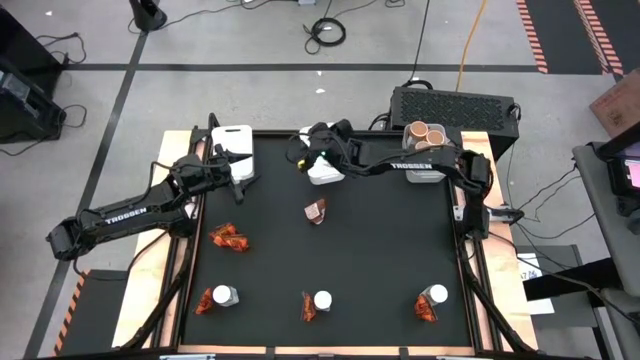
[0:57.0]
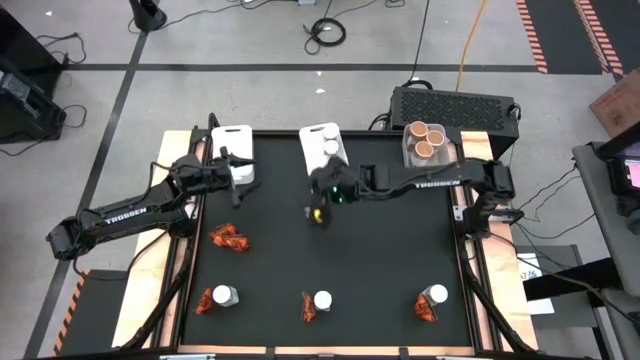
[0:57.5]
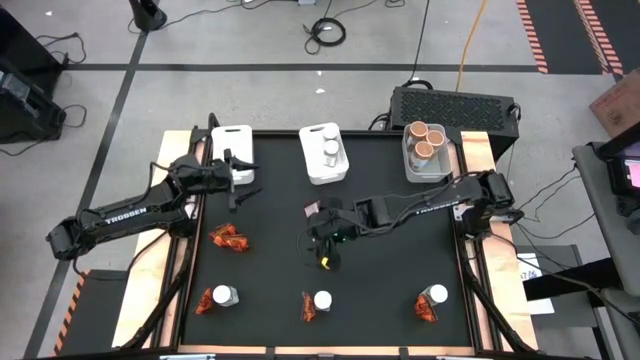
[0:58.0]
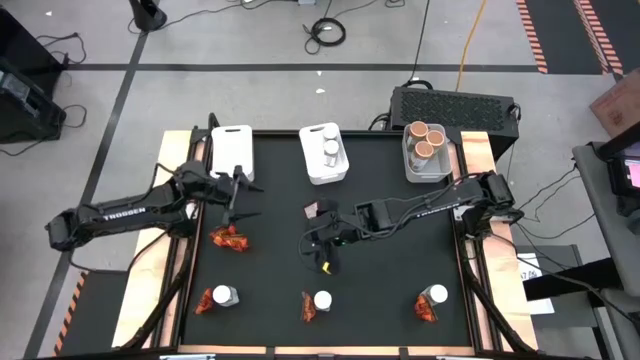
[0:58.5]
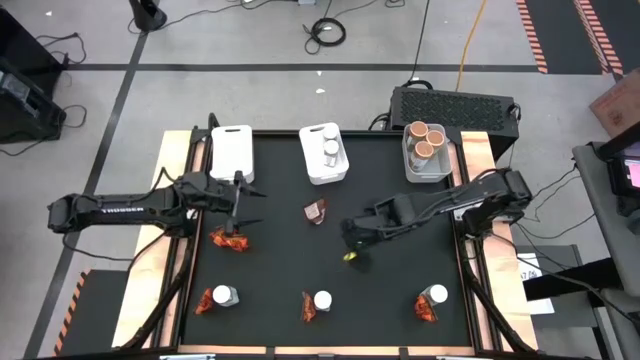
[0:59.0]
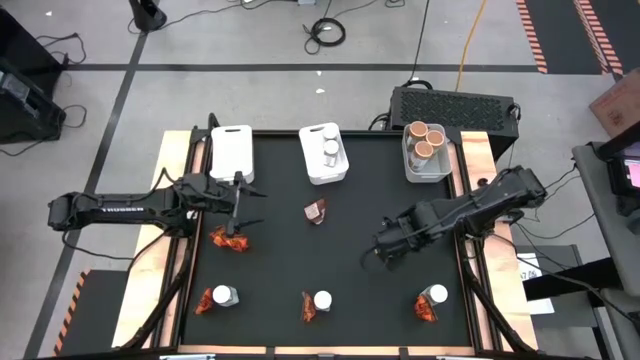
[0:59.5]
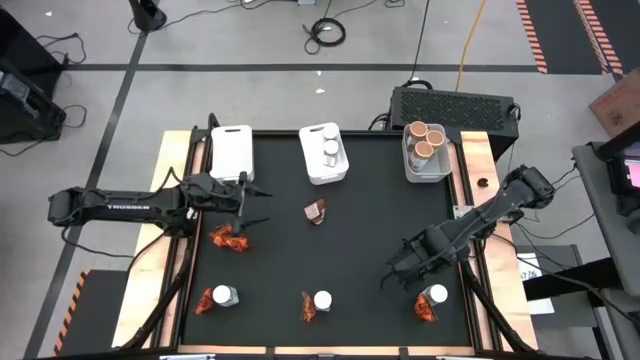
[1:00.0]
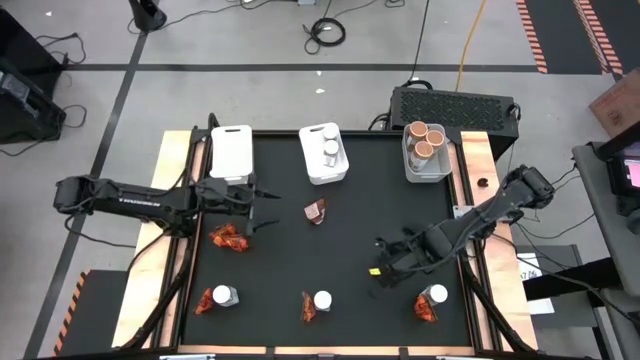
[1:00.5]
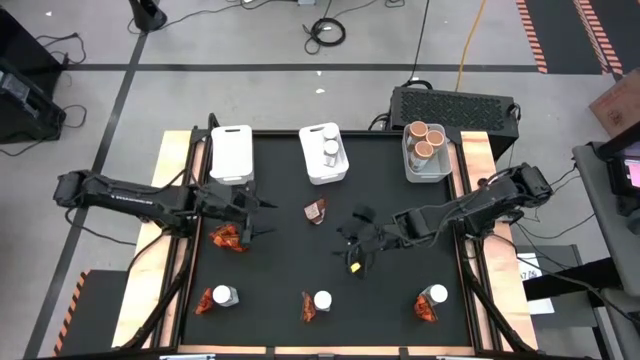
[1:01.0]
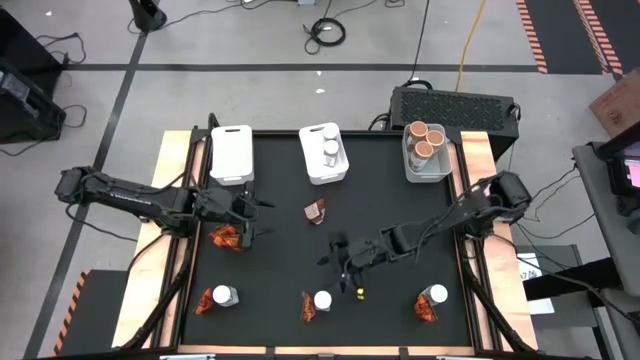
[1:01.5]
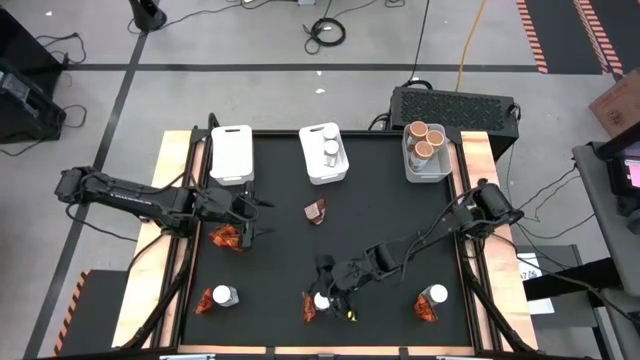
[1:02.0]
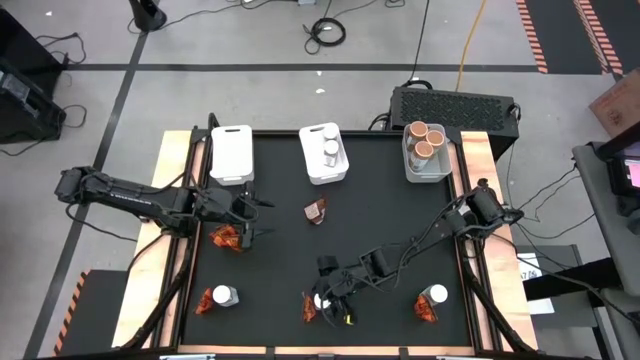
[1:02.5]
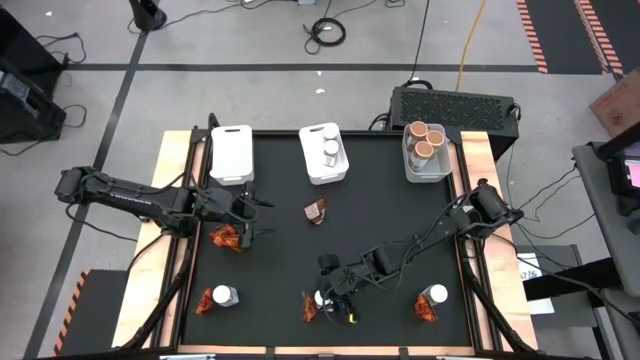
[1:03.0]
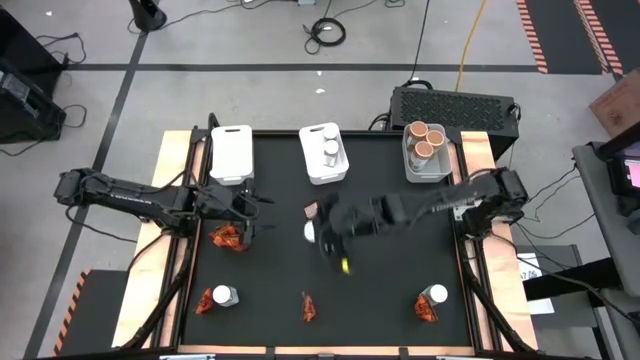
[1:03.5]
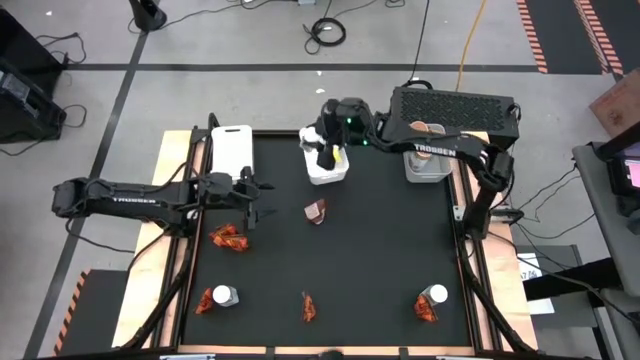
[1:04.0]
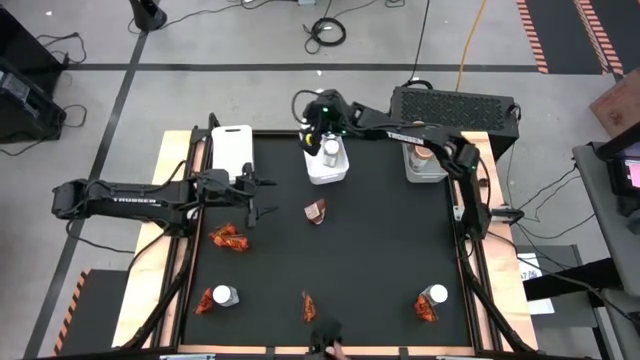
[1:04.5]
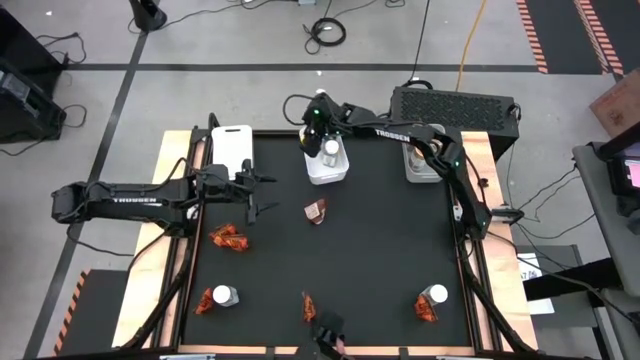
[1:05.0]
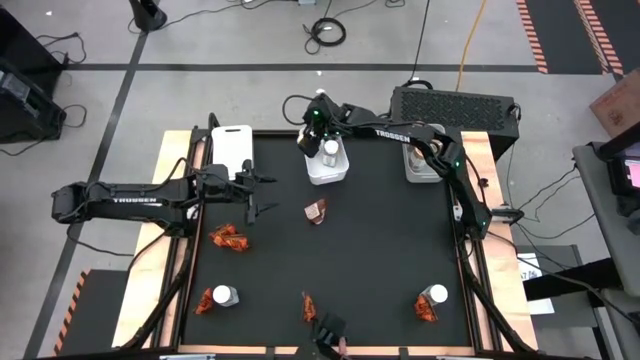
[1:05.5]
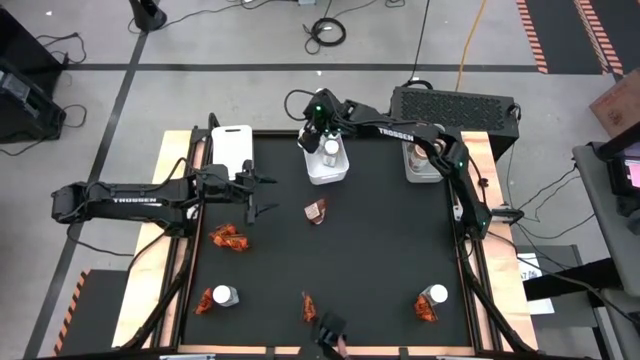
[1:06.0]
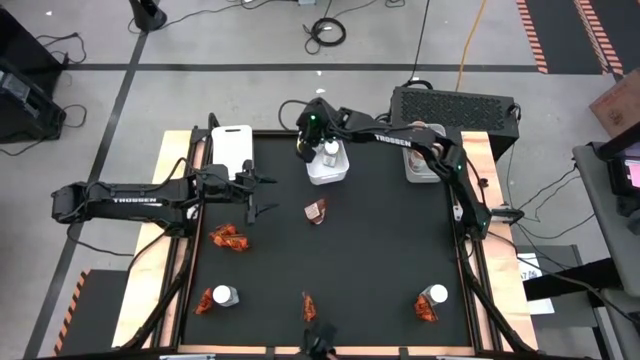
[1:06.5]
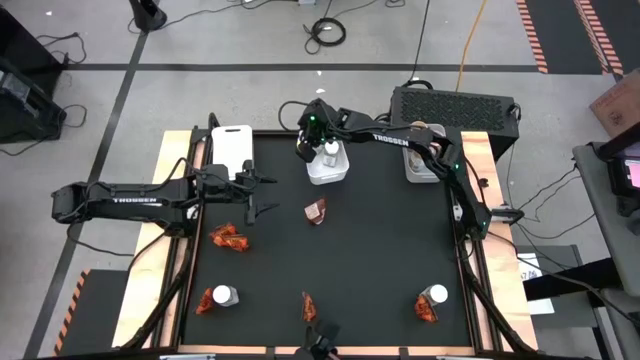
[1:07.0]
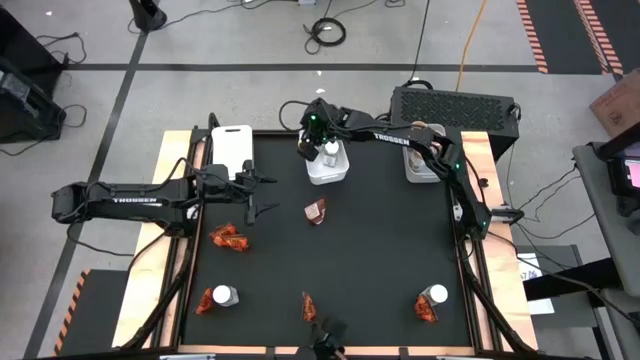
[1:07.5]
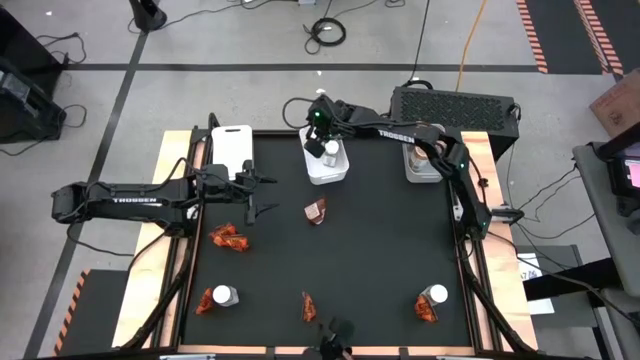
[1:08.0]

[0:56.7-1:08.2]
Task: Sort spices by type
Put the white seasoning bottle into the right white bin

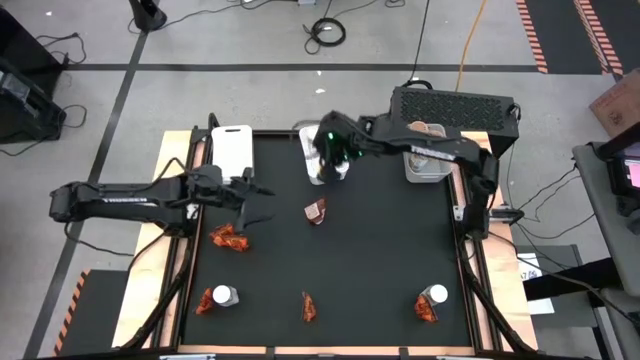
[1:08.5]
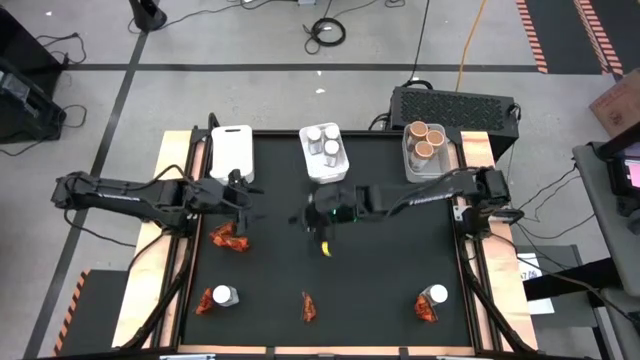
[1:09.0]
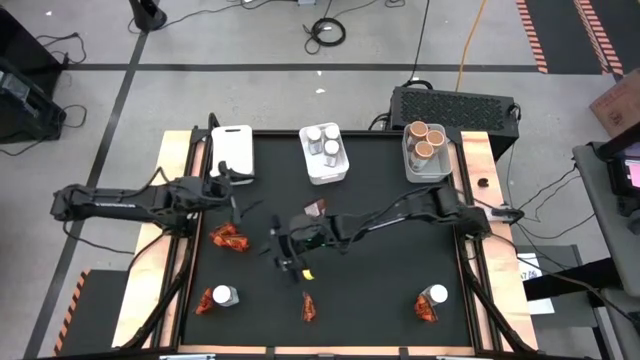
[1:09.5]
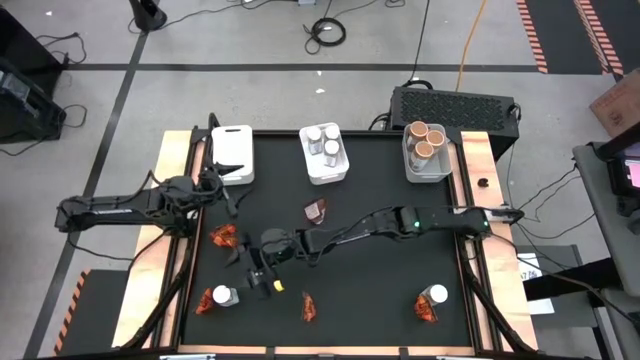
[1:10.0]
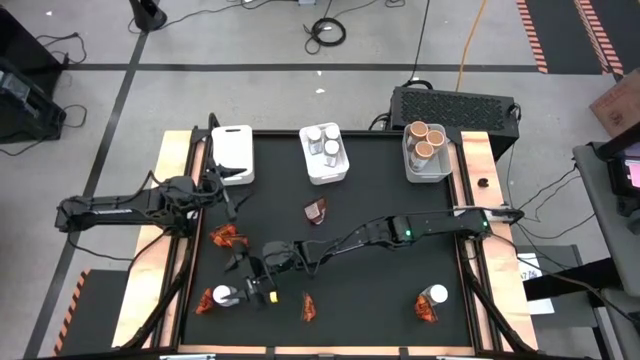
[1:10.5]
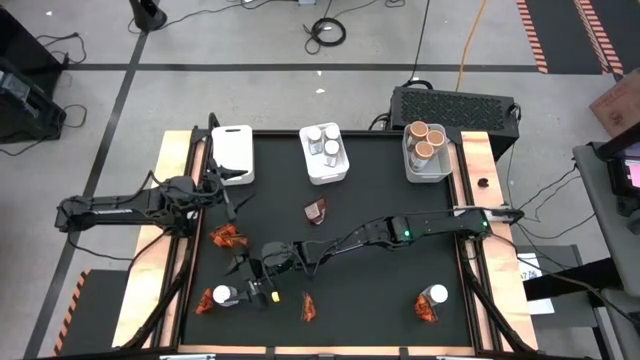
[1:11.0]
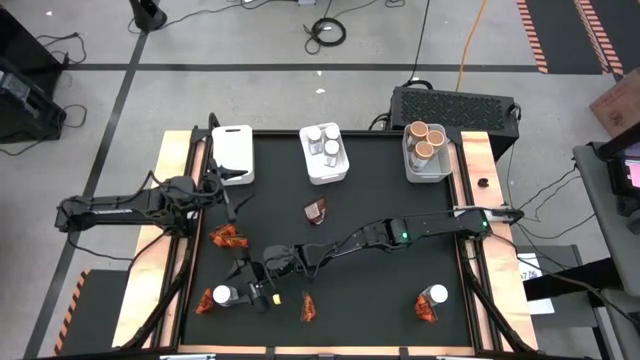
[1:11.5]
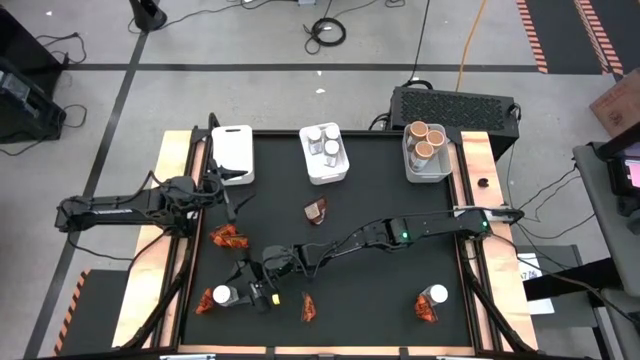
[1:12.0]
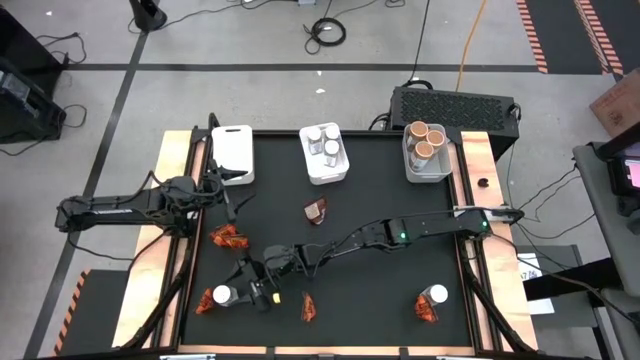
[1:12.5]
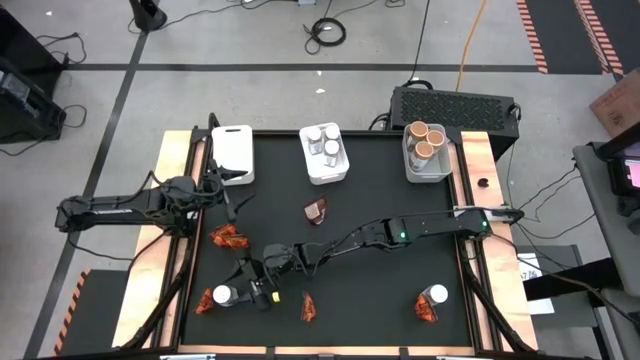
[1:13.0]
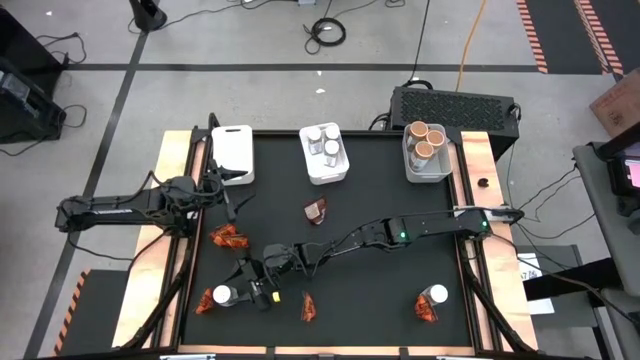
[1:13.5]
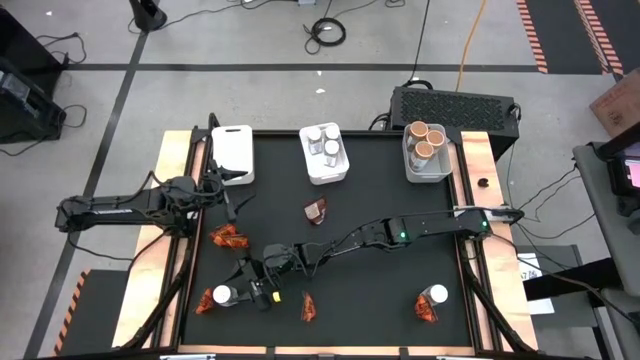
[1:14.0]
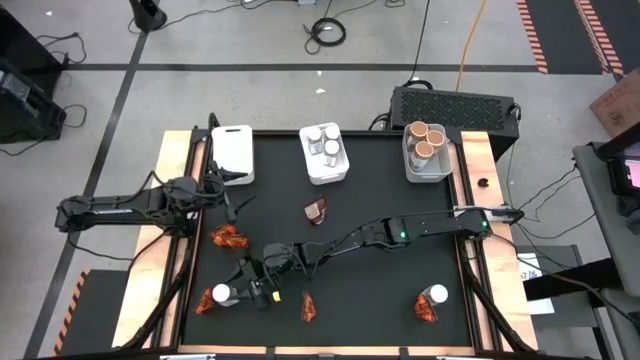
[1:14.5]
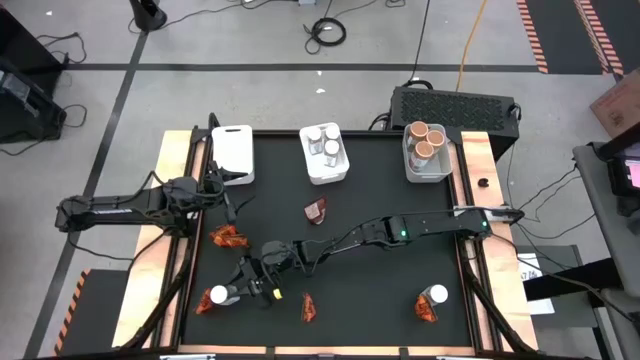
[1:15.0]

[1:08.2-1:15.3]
Put the white seasoning bottle into the right white bin

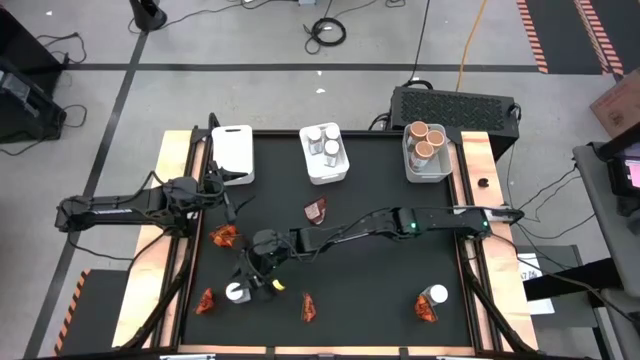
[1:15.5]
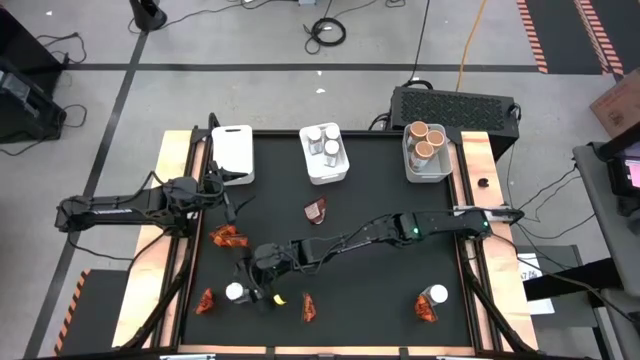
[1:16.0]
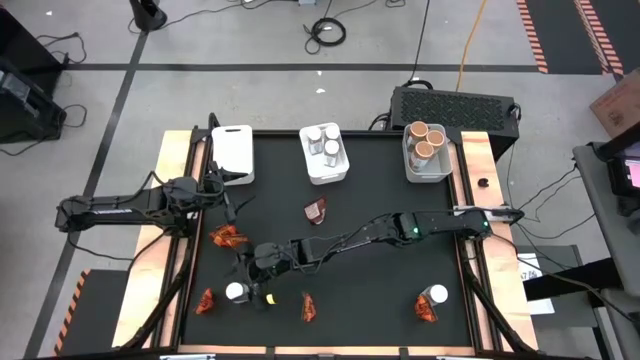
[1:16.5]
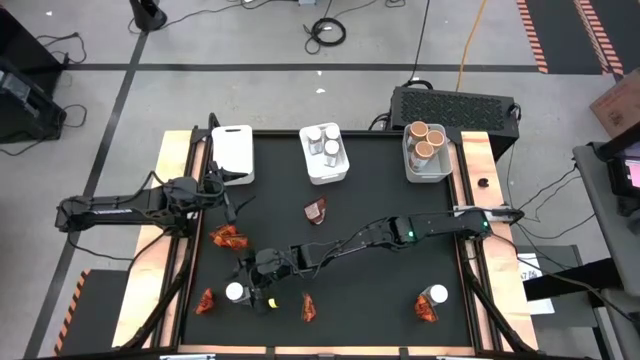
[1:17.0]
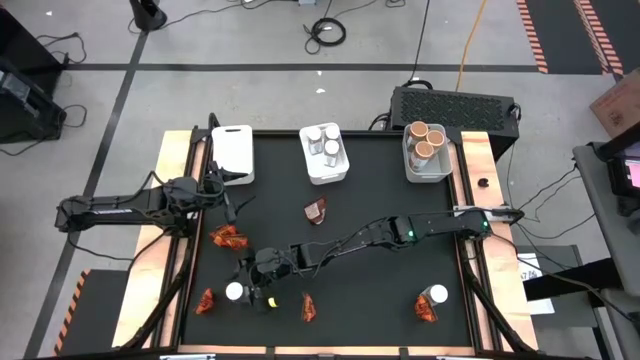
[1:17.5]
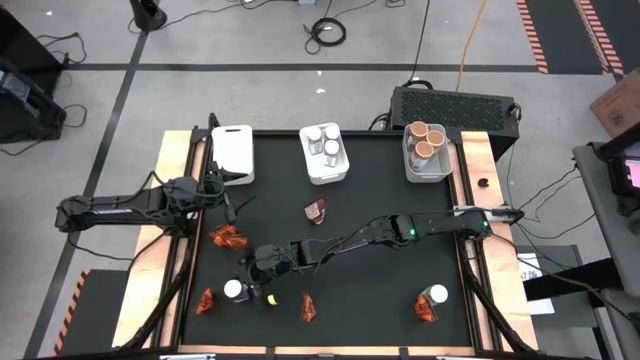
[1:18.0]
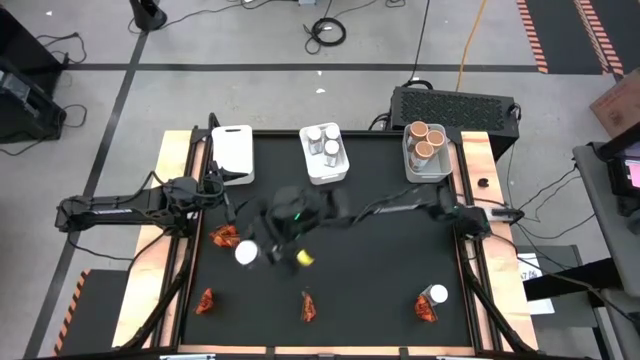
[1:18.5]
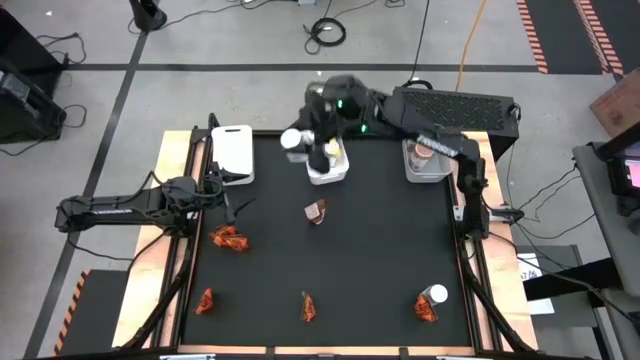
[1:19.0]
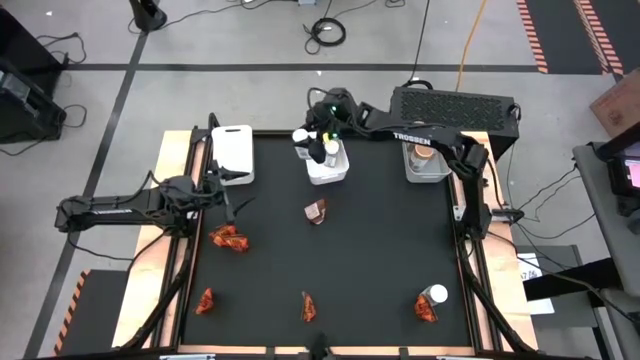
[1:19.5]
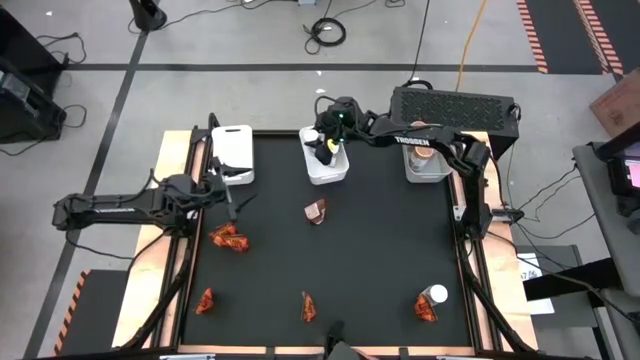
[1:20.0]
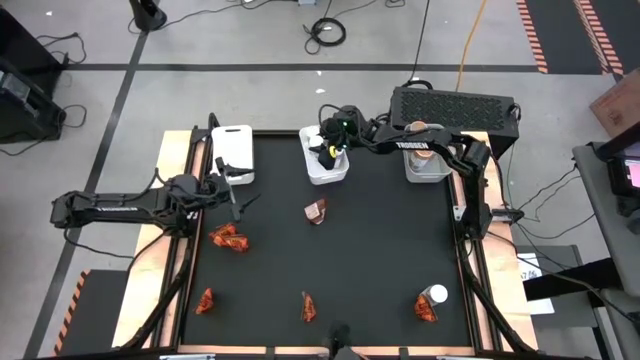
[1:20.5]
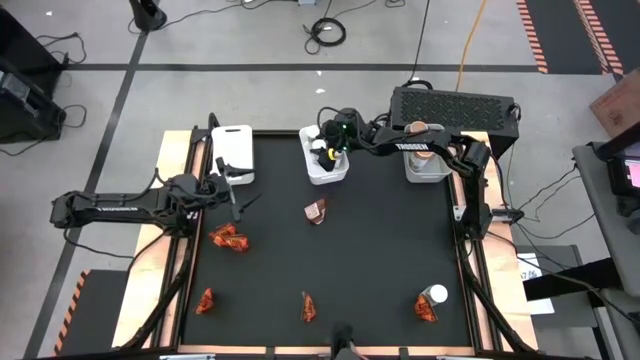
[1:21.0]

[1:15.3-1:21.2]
Put the white seasoning bottle into the right white bin
